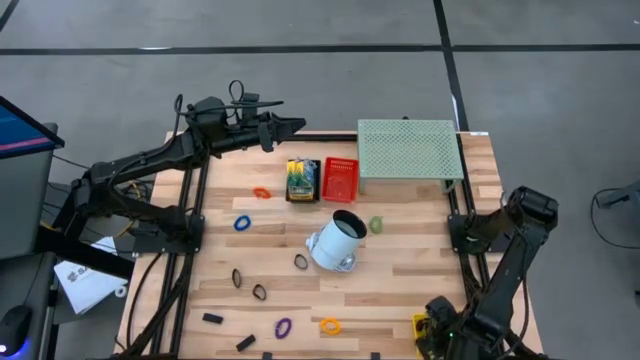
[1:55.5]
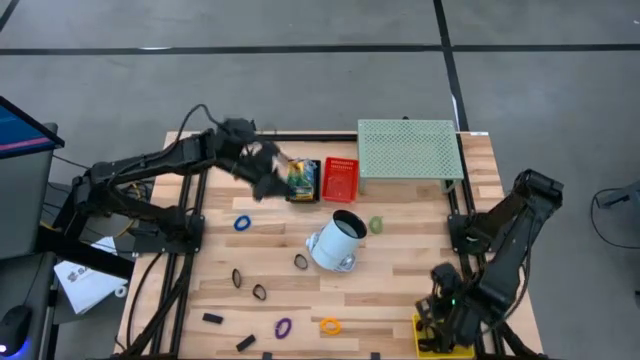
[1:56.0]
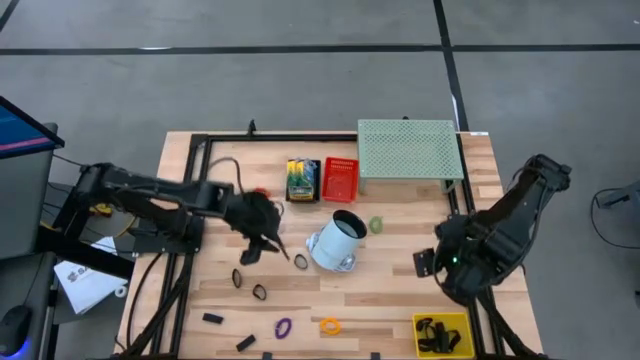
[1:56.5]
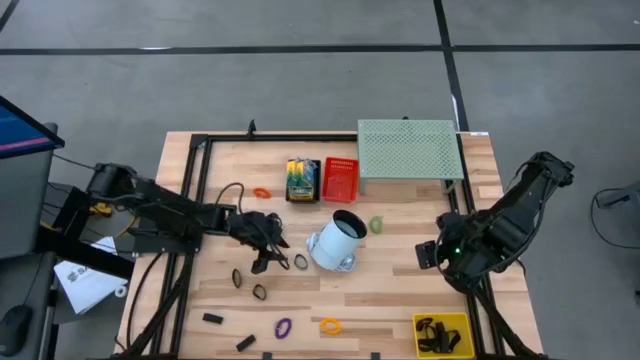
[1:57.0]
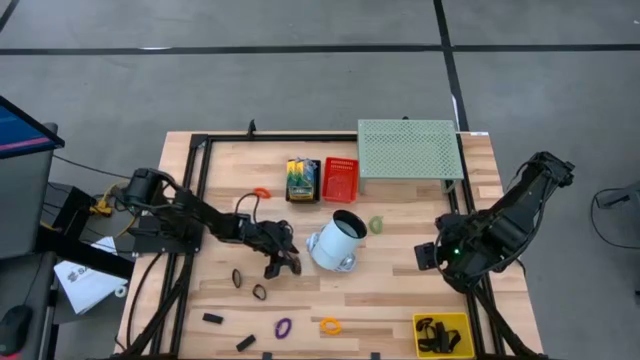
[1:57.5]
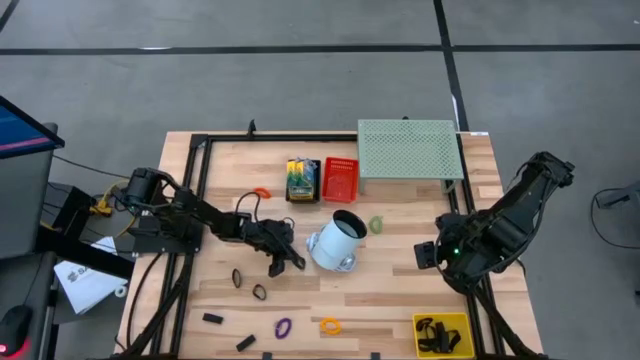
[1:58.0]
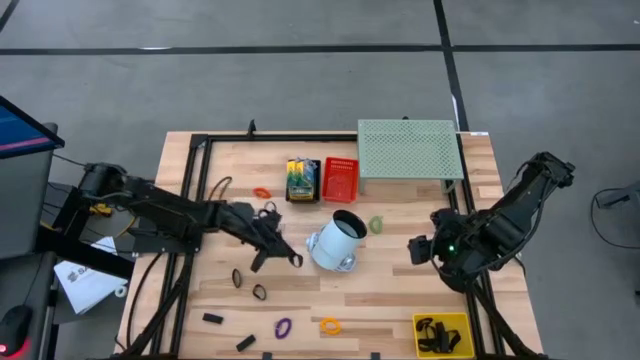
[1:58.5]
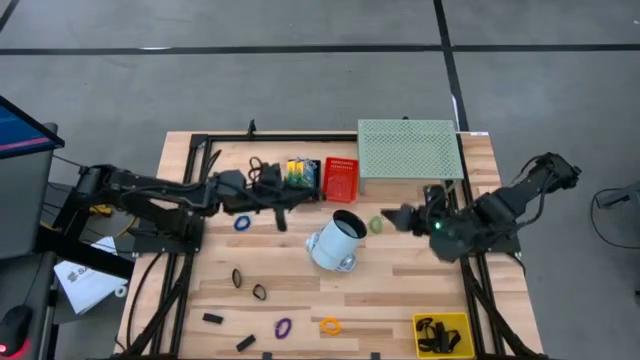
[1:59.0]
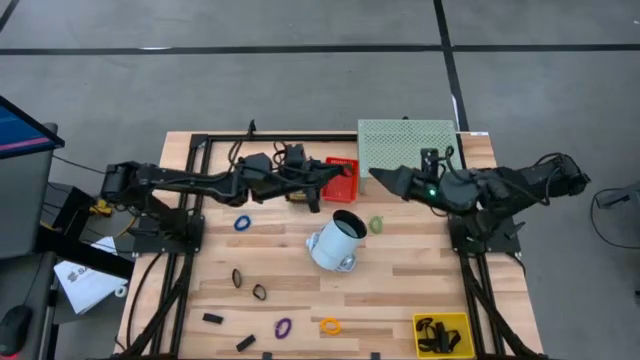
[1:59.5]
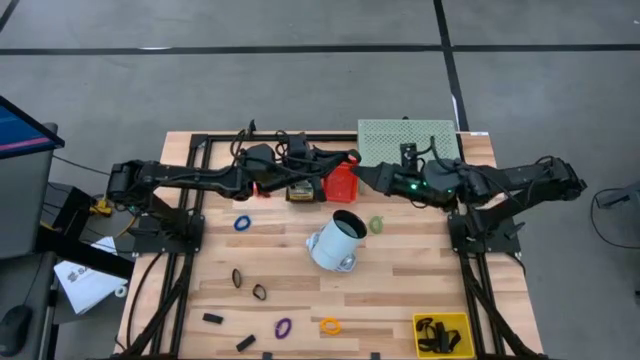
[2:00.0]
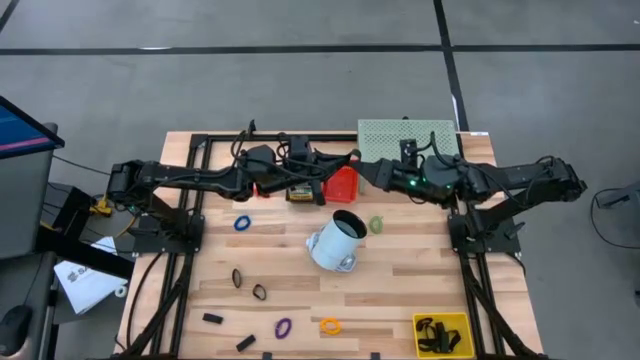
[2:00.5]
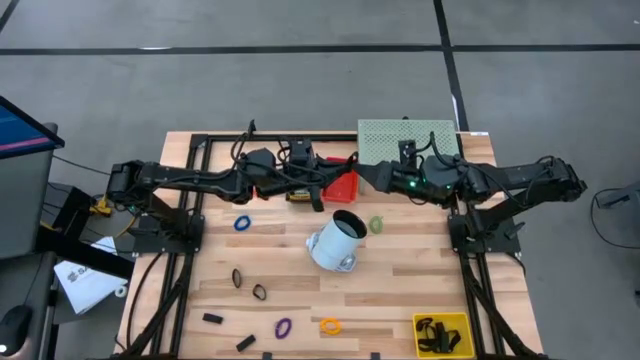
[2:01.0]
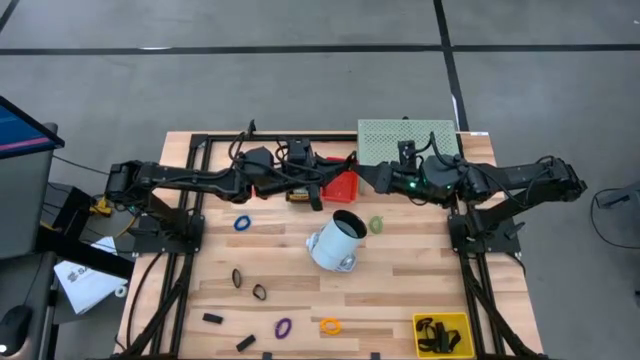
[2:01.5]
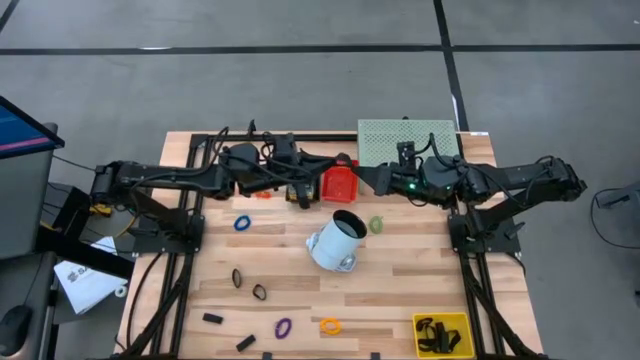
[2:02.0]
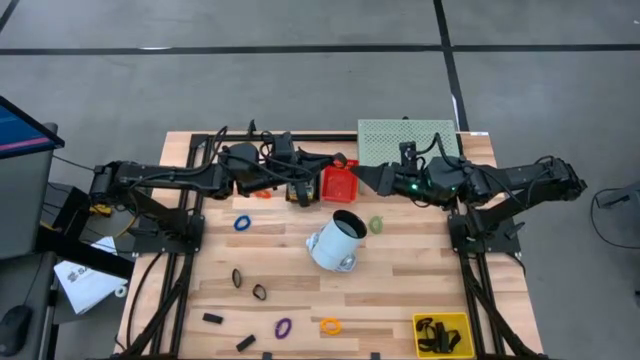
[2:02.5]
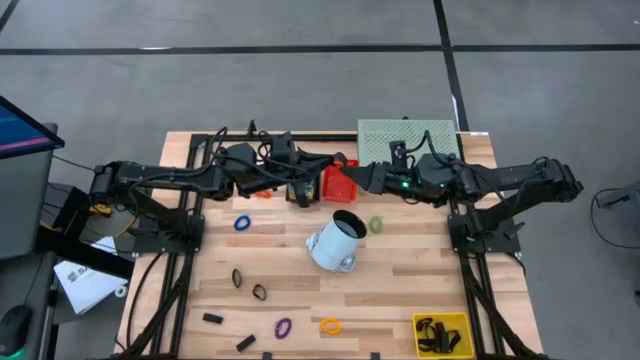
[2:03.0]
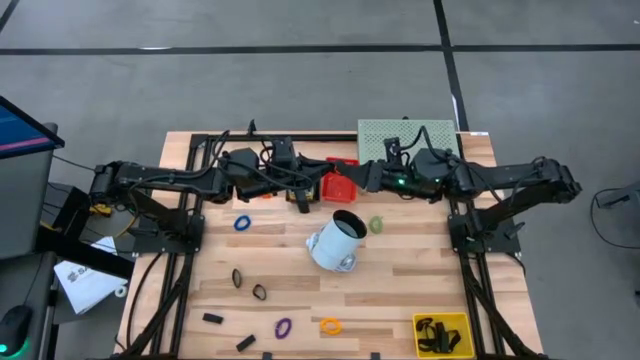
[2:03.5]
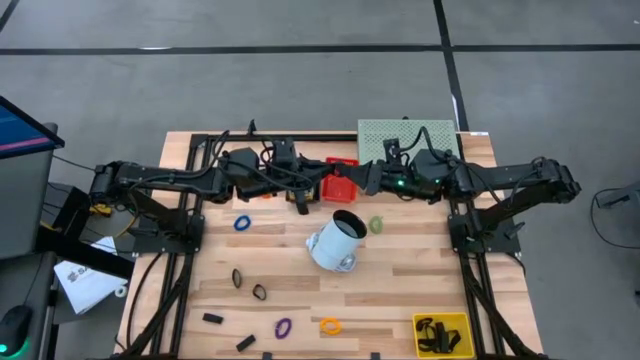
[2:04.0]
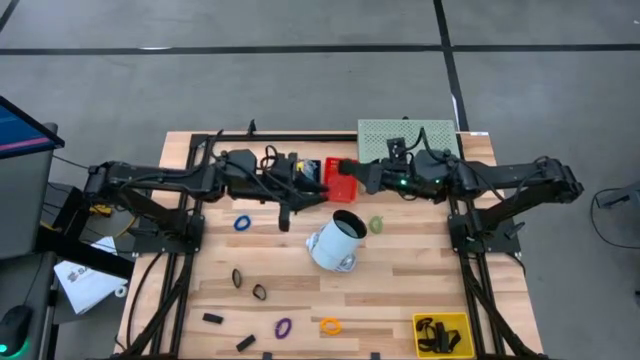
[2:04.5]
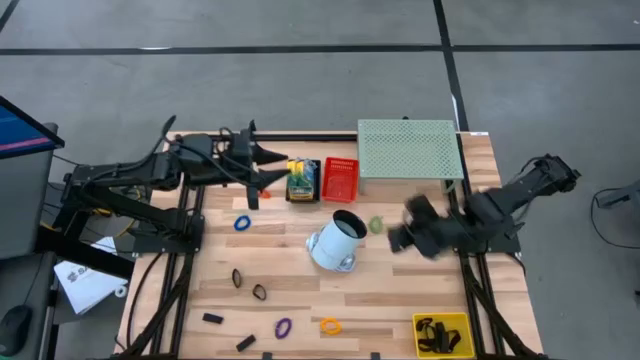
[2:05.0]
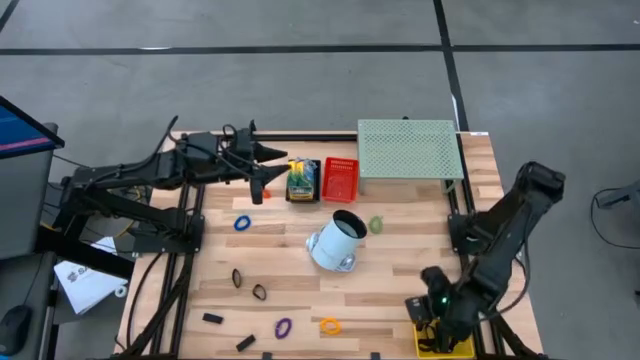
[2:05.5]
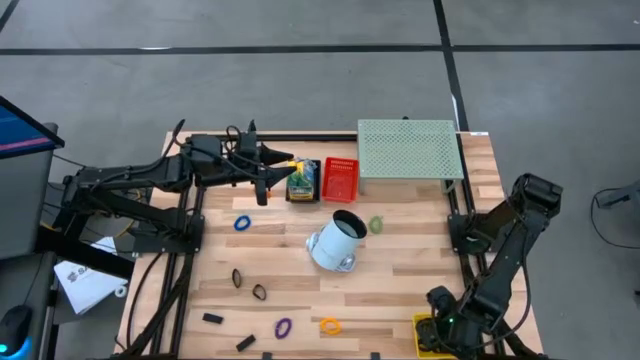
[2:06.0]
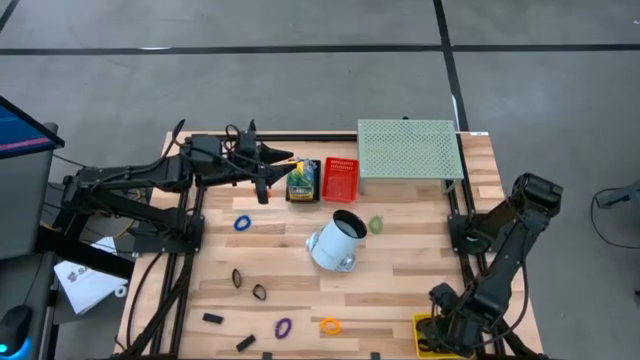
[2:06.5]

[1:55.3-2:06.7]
Task: Pick & Place Office Desk Supplies
Put the black rubber band into the yellow bin

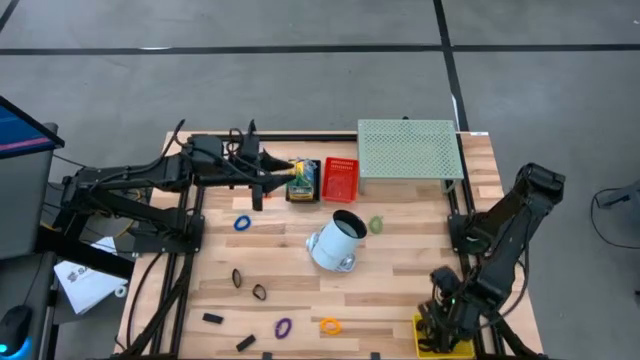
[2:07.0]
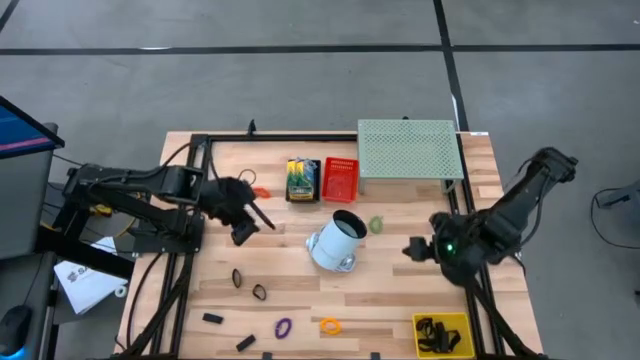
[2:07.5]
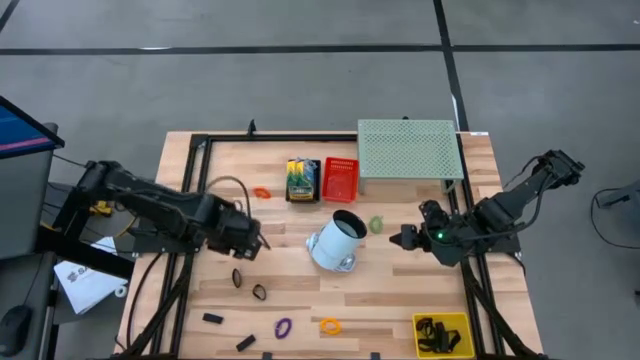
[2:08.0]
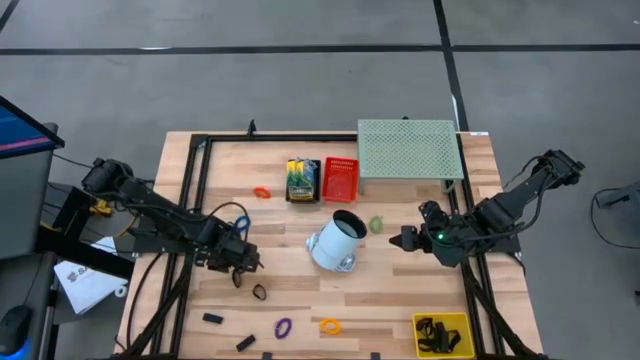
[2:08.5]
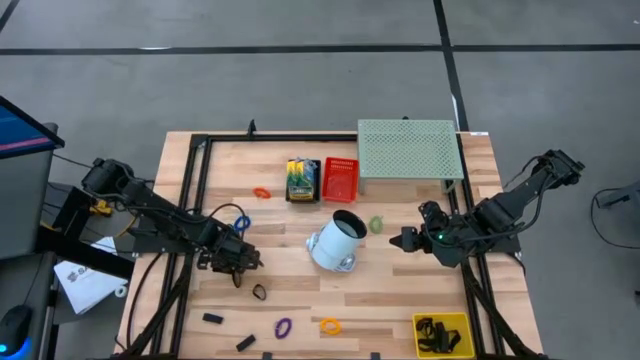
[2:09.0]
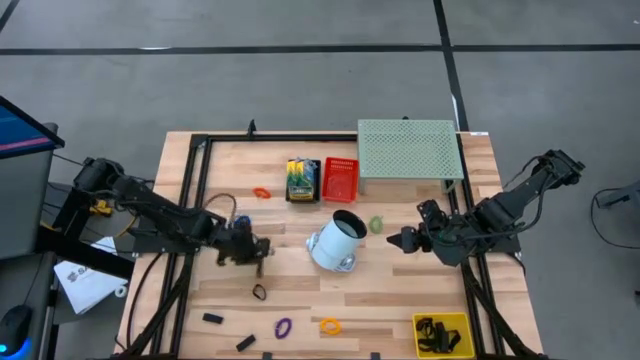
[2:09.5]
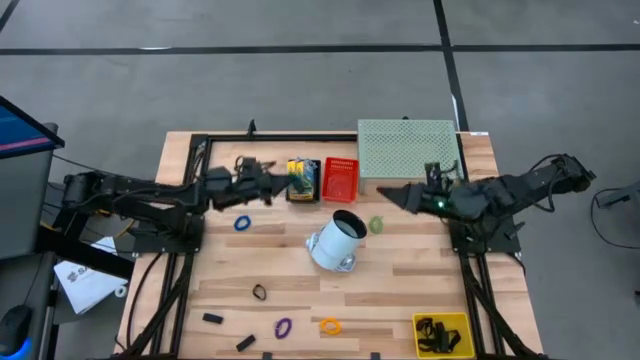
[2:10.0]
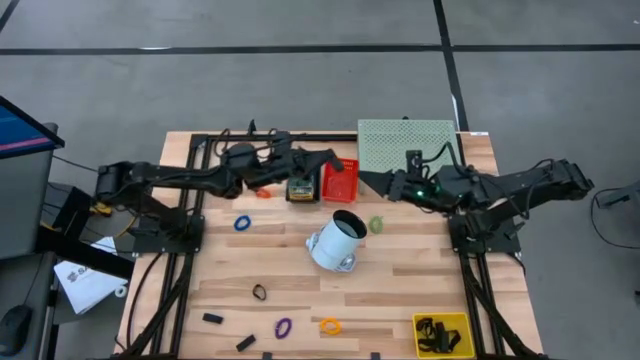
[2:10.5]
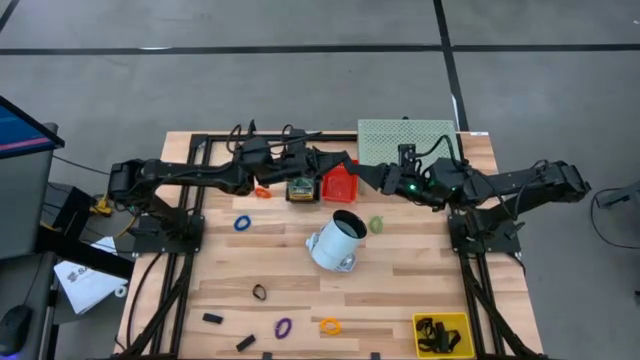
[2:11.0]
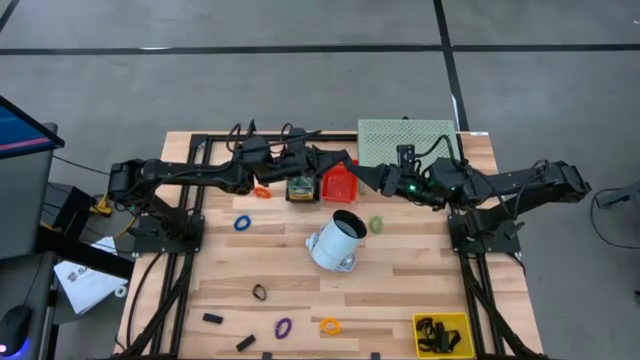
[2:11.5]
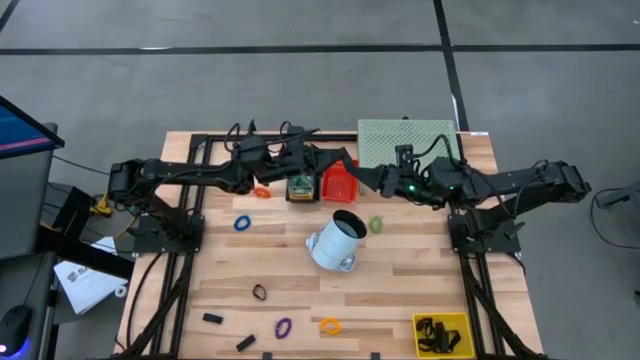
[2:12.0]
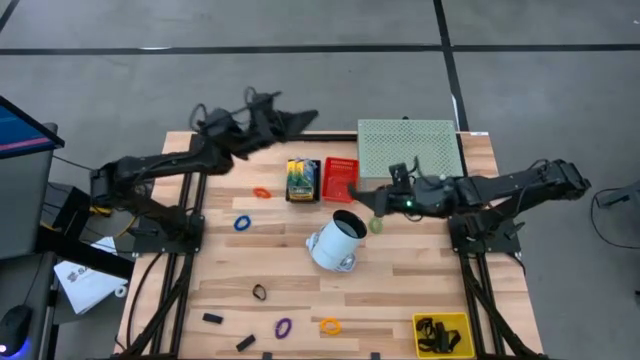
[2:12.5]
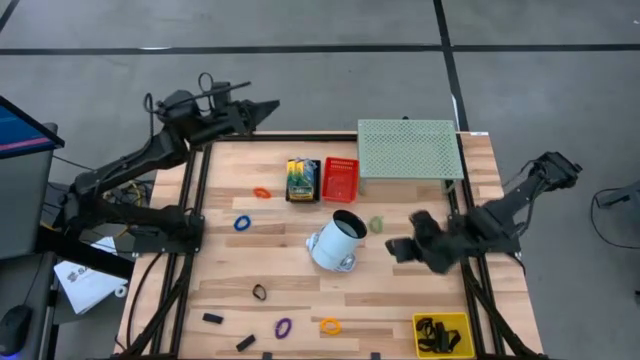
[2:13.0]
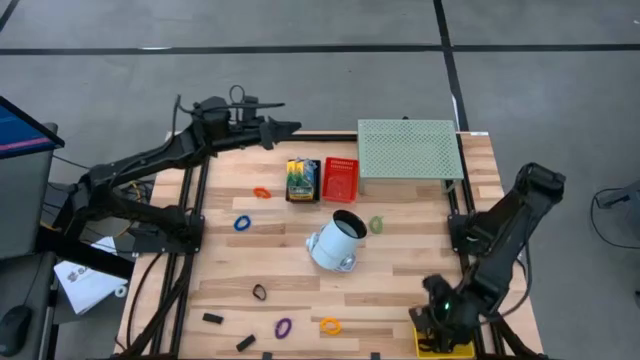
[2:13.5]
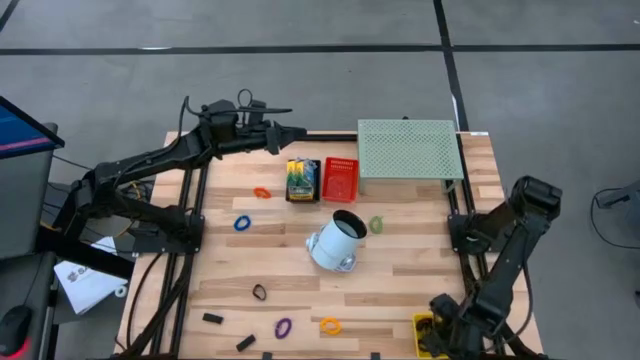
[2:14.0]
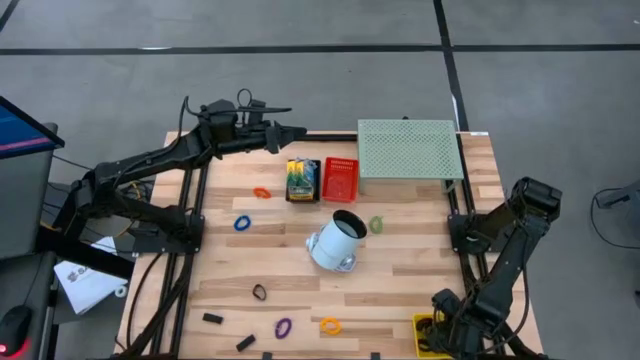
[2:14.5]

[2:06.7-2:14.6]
Put the black rubber band into the yellow bin

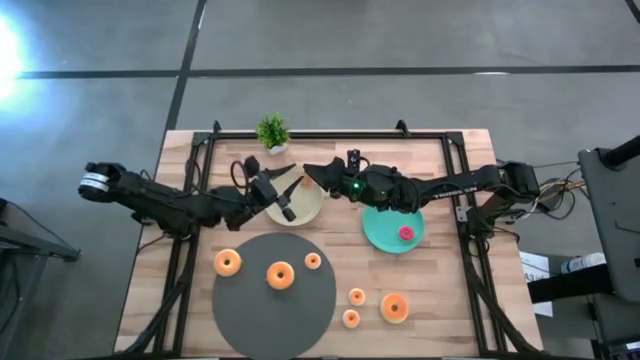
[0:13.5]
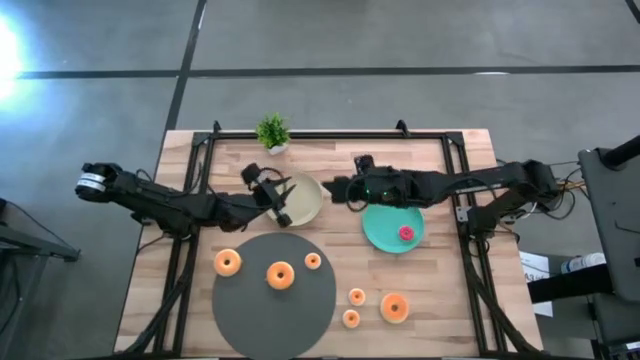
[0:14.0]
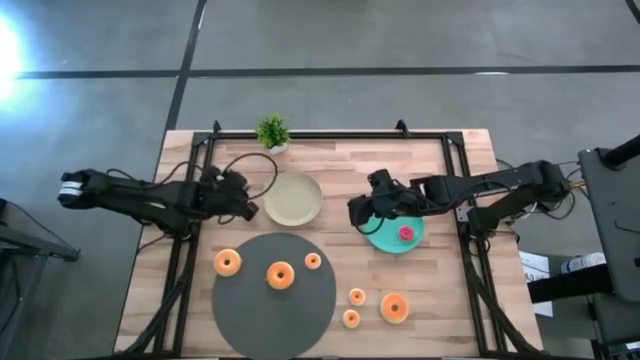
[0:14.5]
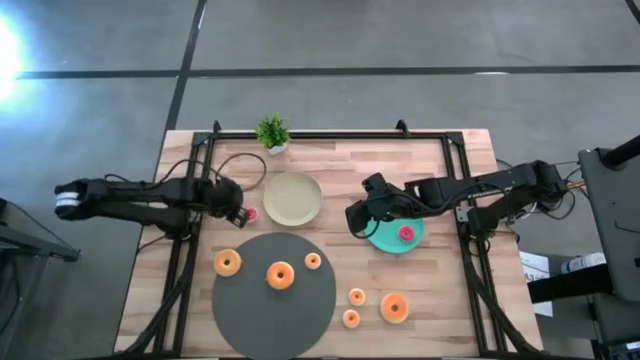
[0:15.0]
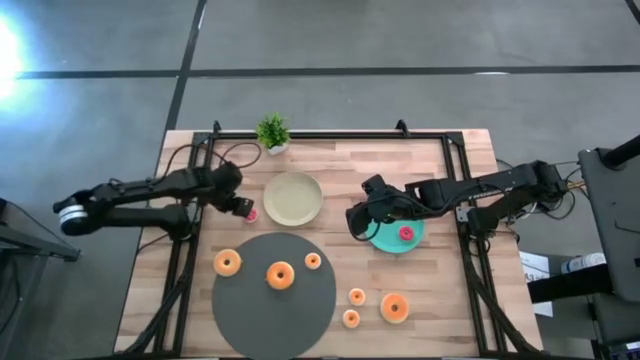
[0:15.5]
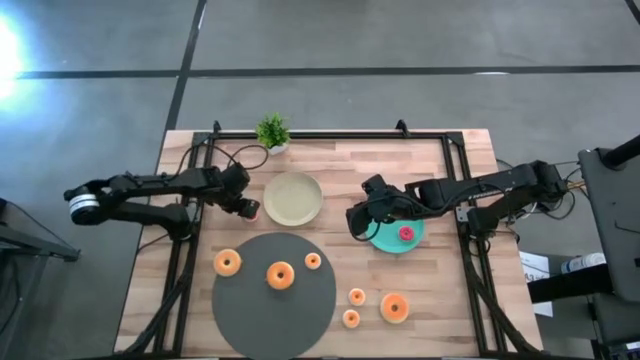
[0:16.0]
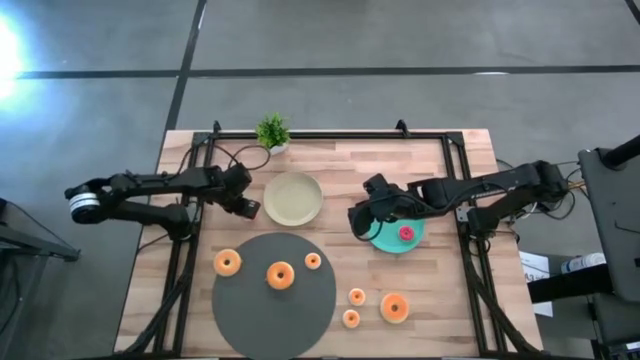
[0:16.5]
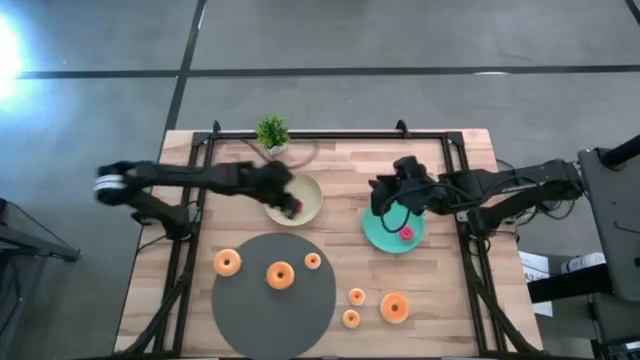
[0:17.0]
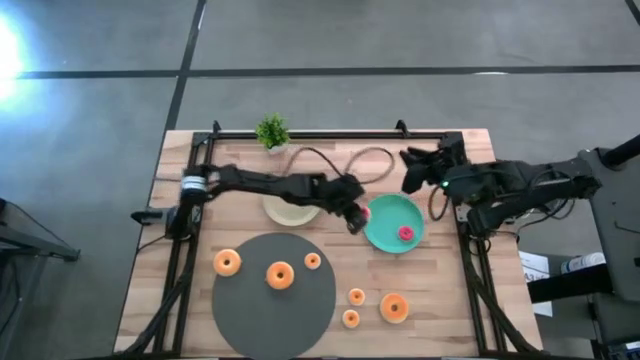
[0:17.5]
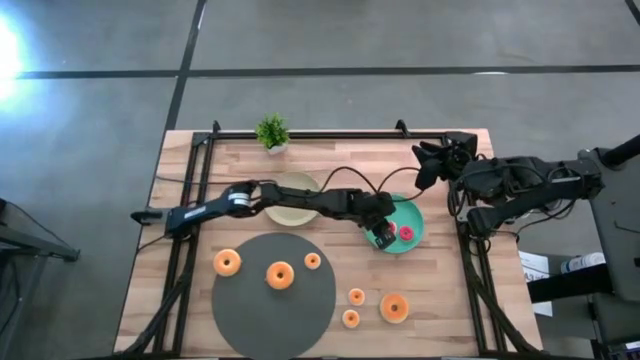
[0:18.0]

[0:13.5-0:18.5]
Task: Pick & Place donuts
Put the small orange donut on the blue plate
